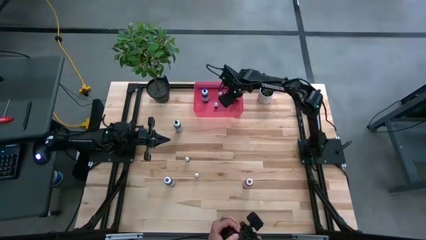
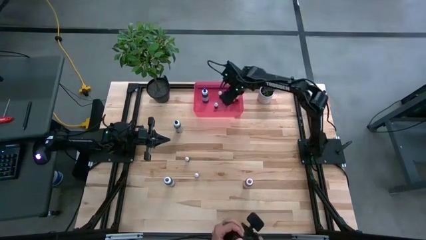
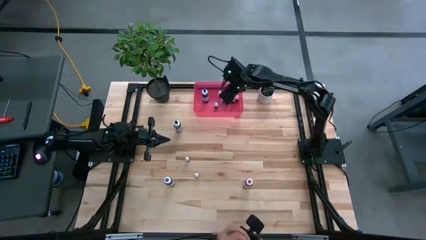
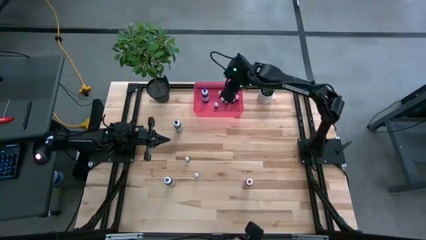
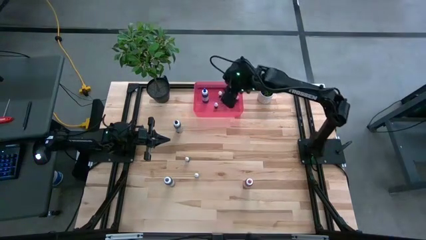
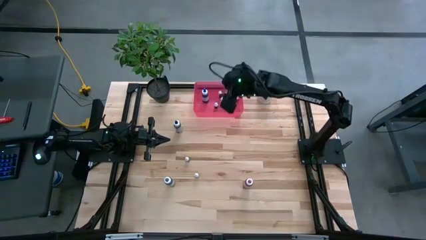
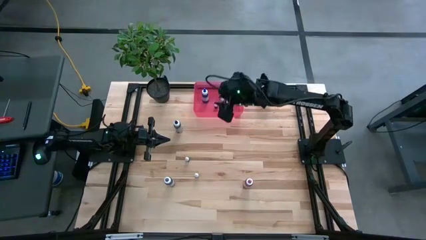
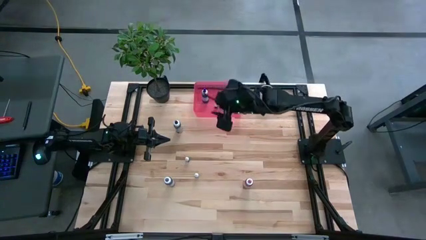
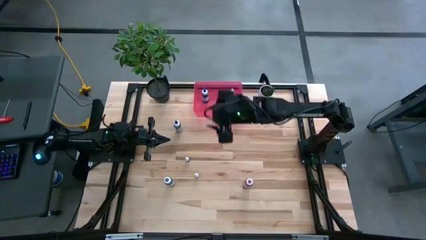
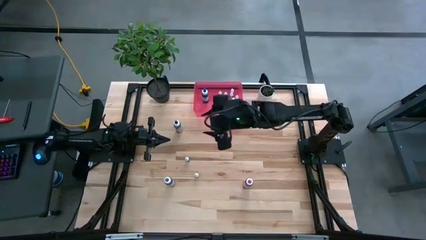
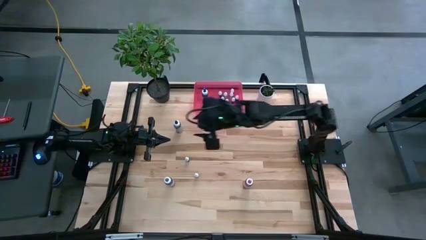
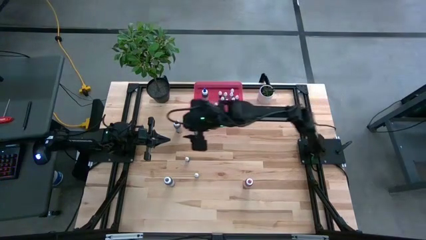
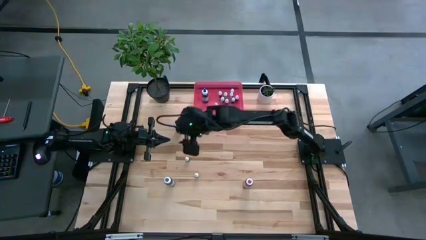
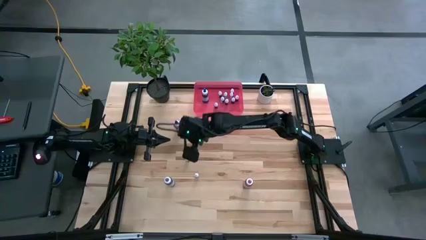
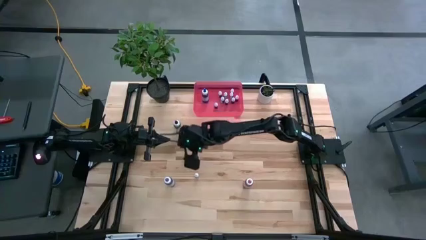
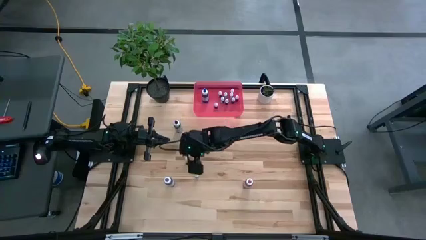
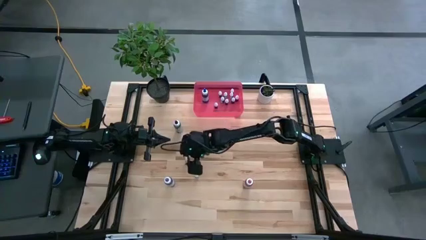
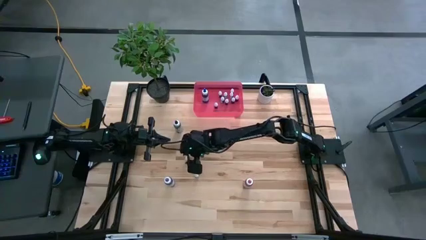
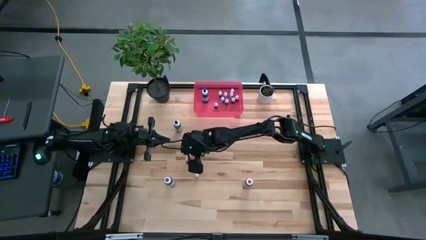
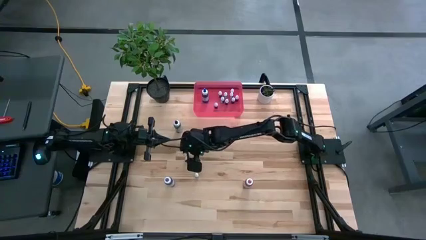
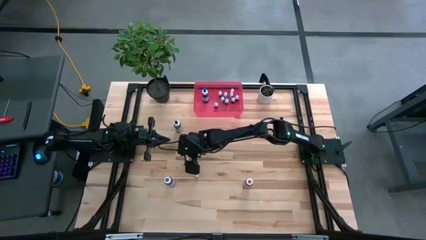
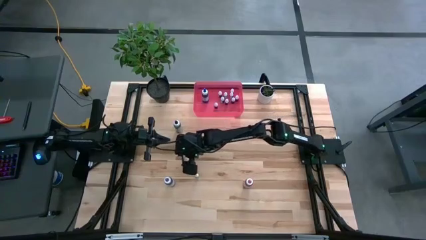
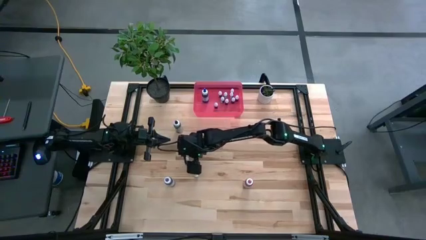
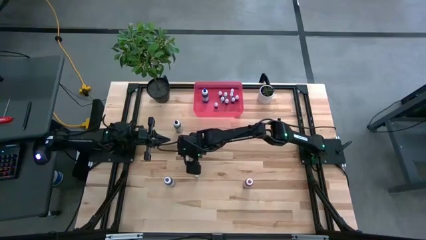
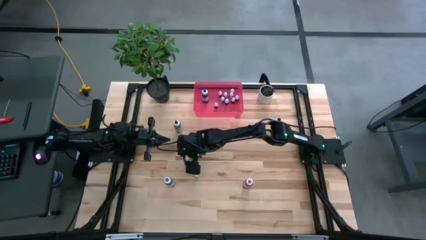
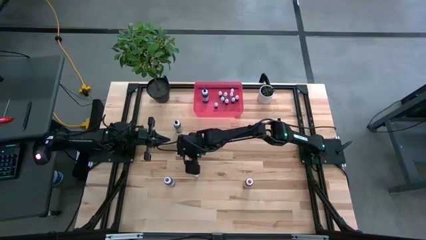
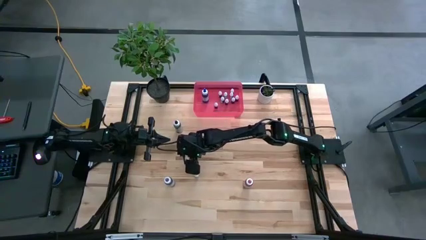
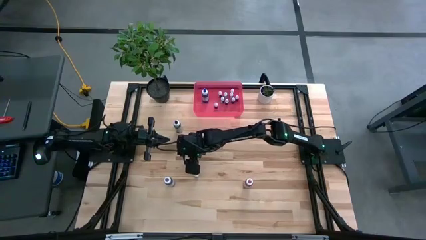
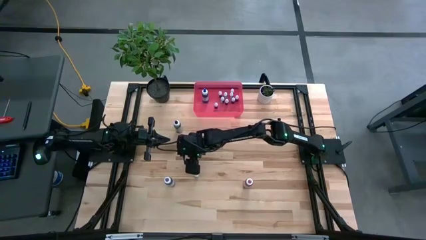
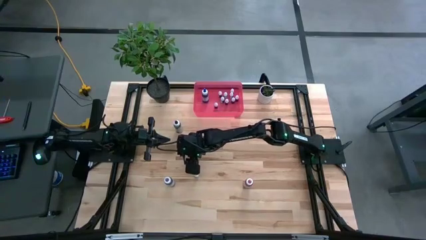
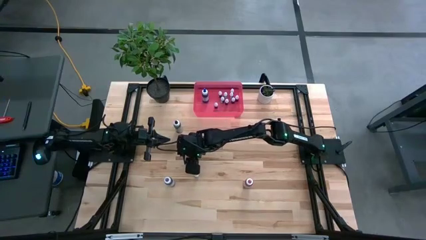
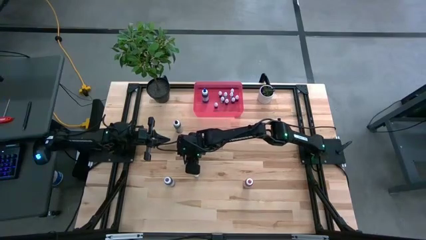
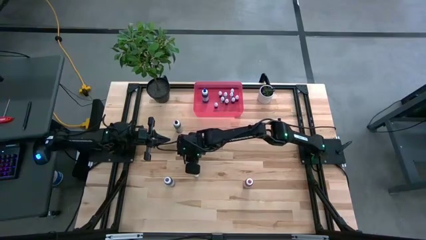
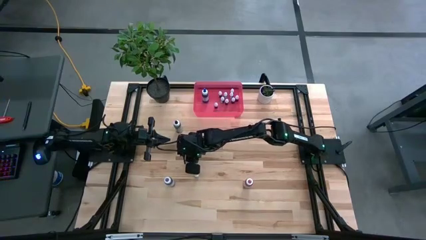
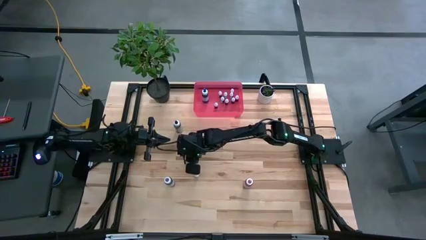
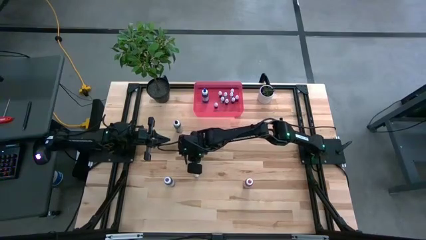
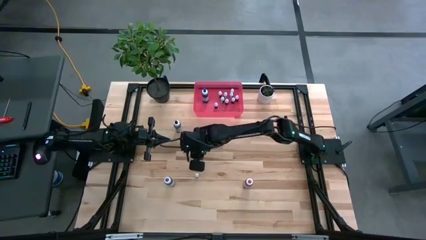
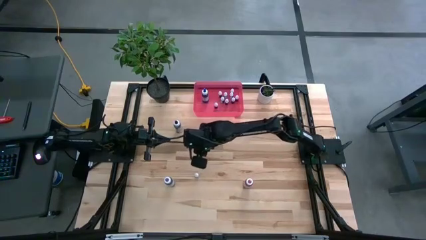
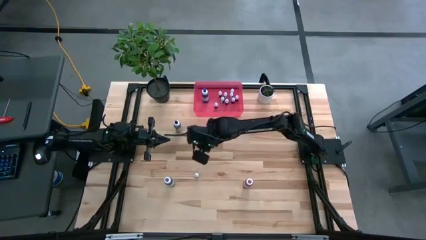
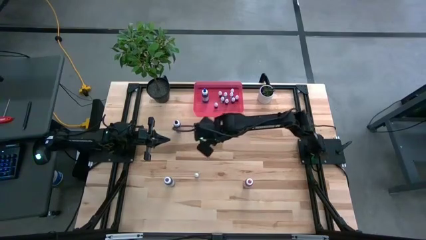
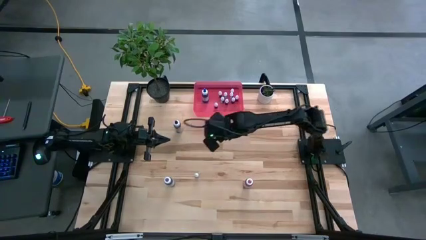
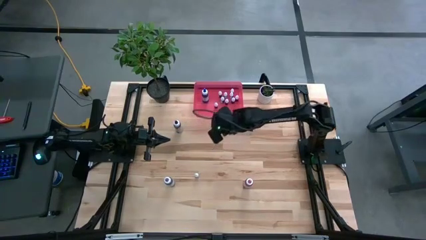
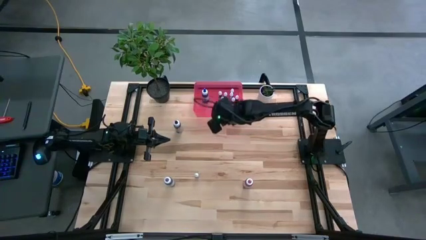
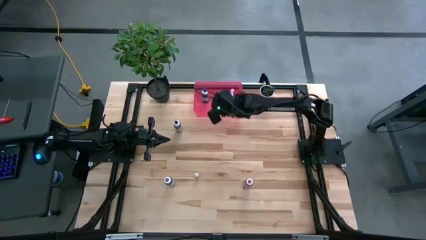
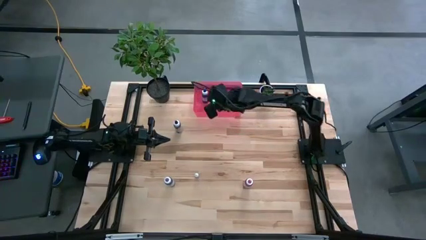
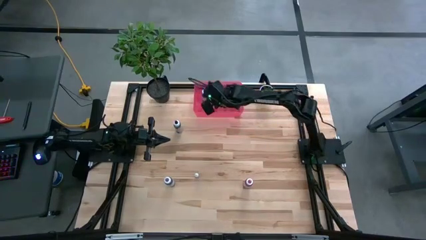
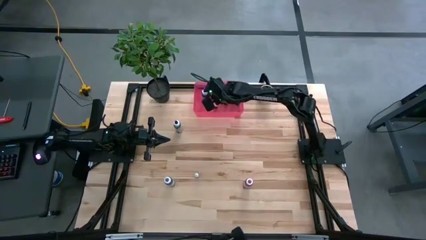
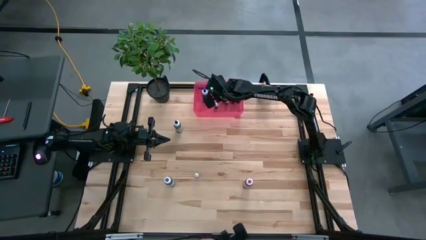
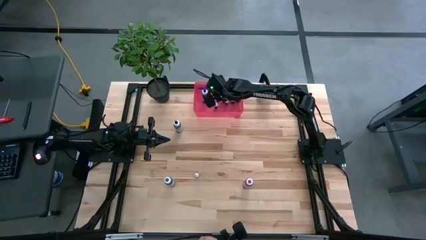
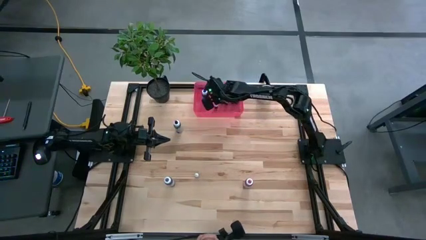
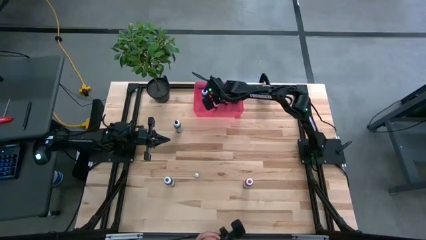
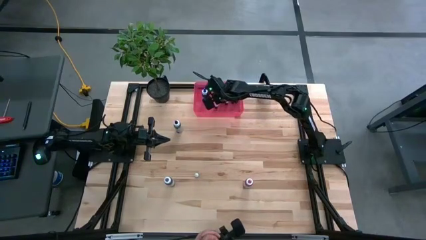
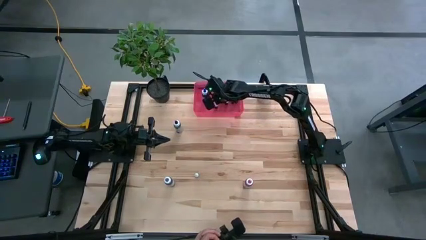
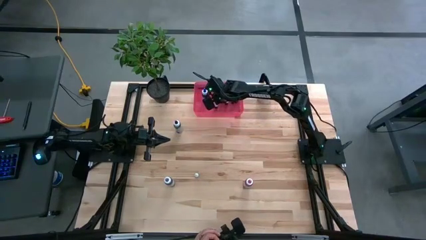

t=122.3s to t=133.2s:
Task: Pick & Place food coloring
Put the small black food coloring bottle into the red bin

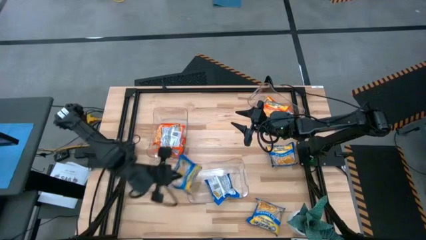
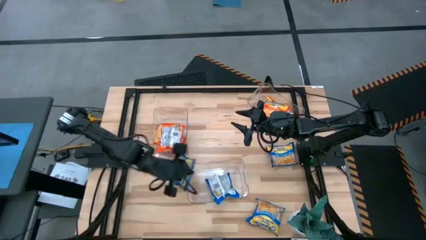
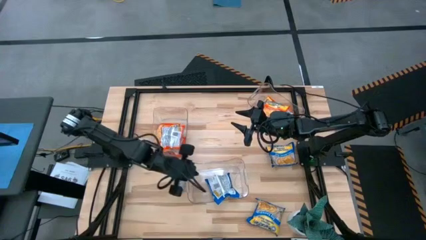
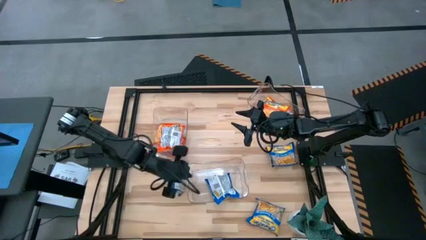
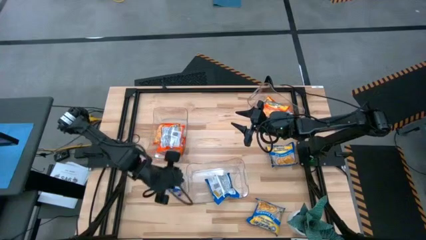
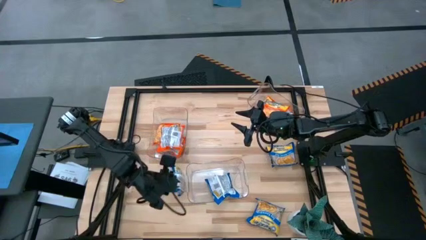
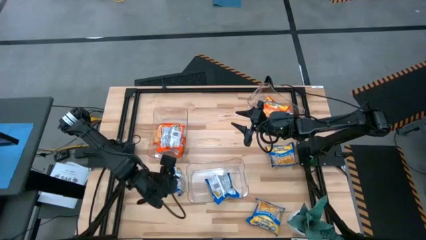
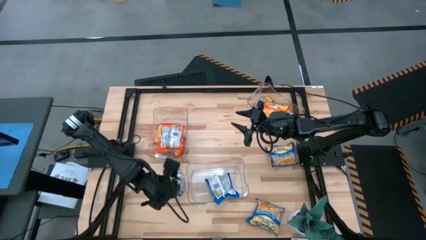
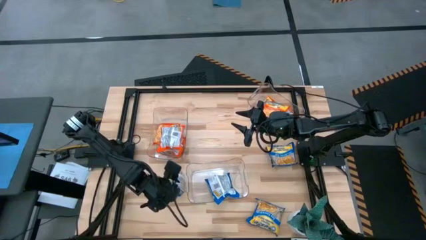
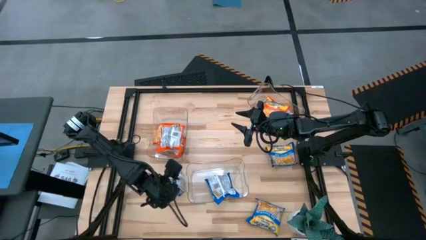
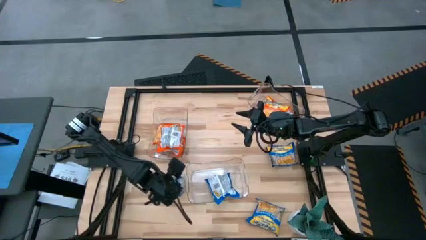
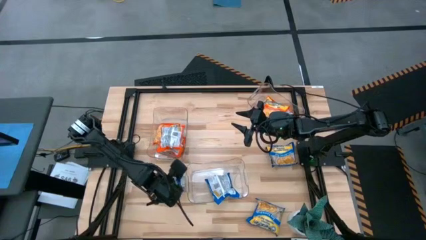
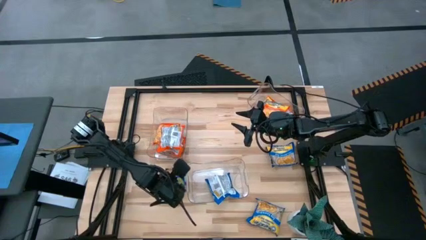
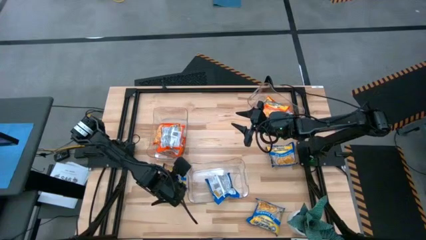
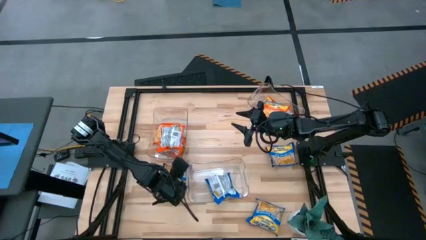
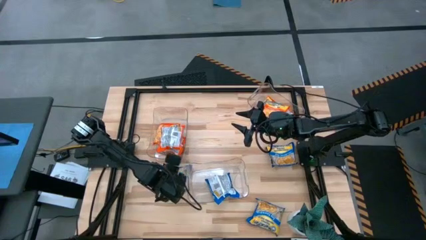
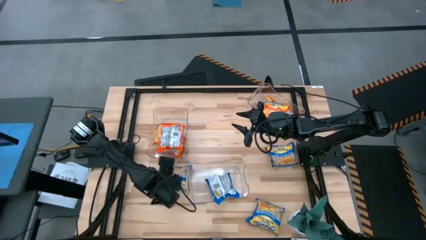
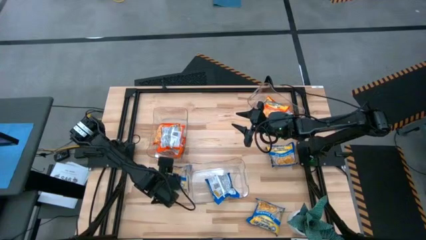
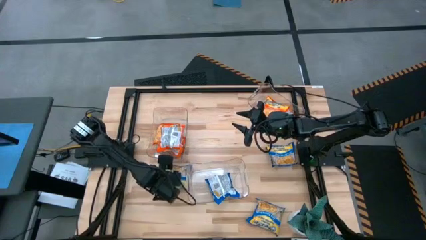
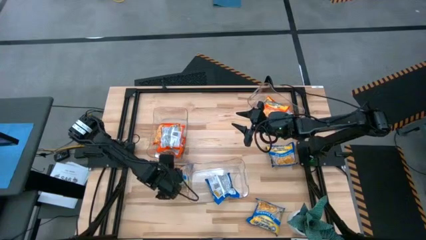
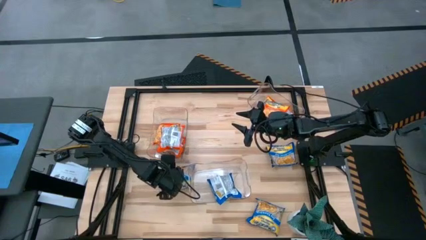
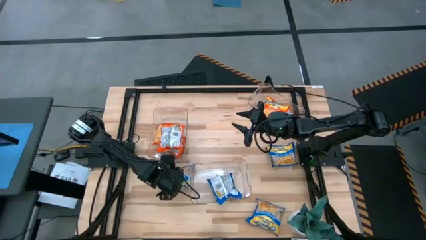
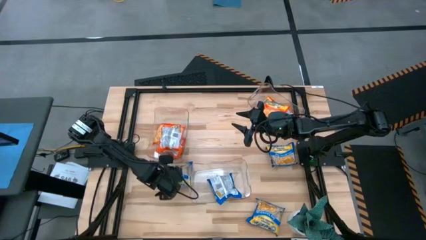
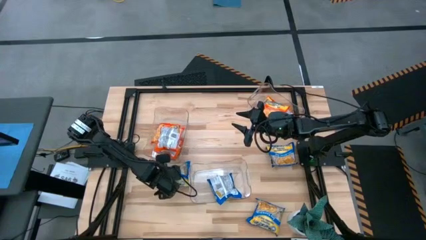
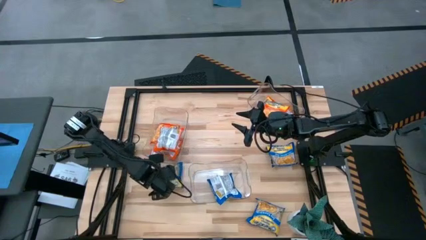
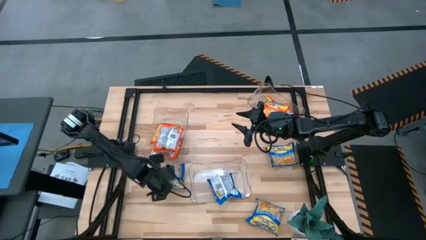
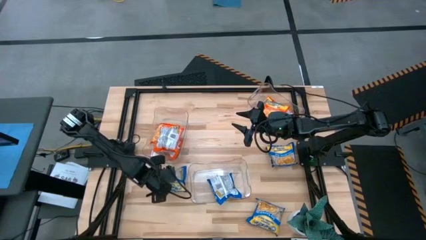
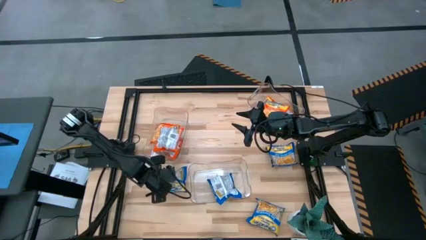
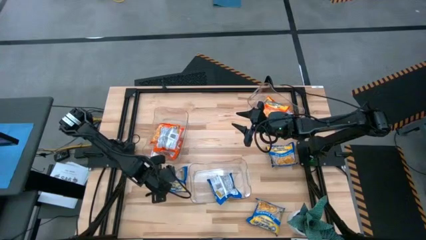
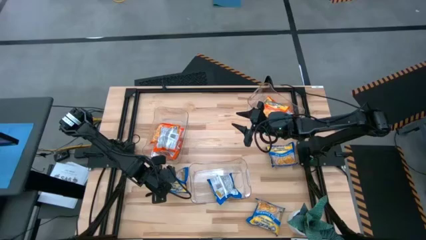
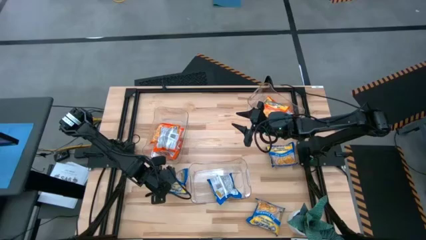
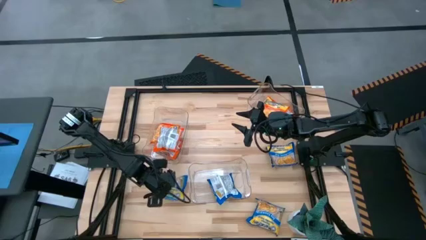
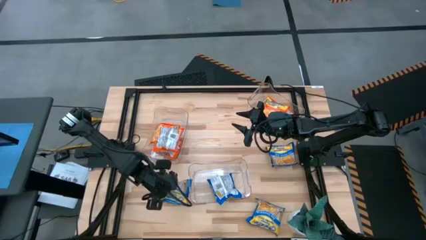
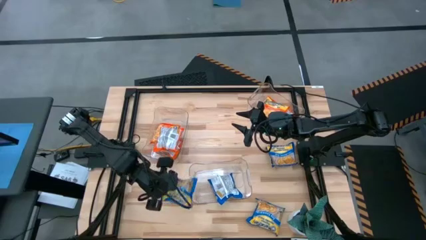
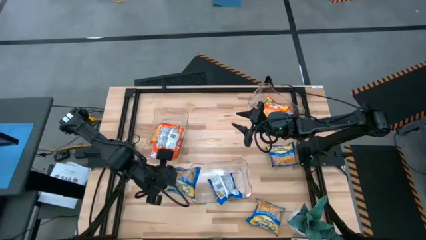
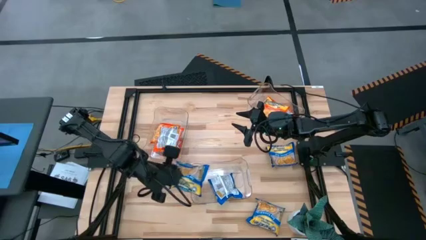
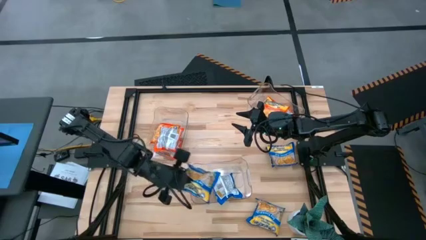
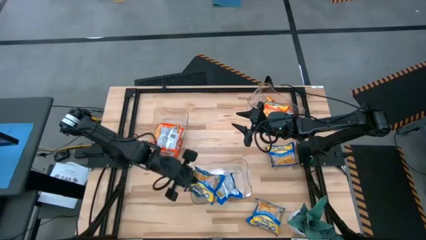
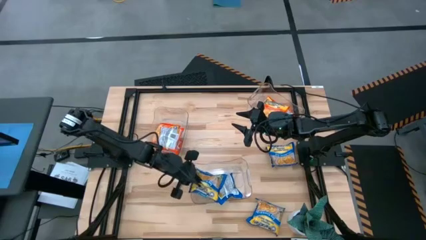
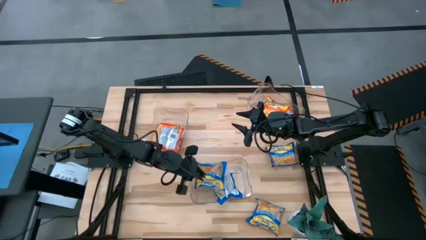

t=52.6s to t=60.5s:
Task: Sort Maruchan noodles
Put the blue noodle pack into the bottom transparent bin
